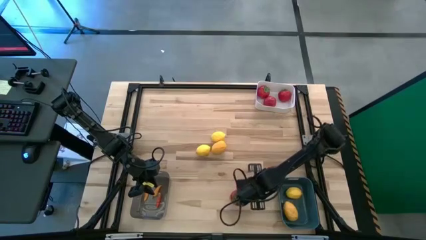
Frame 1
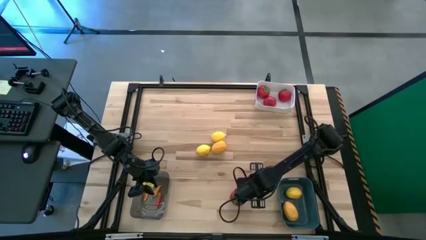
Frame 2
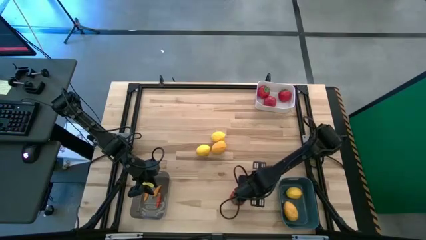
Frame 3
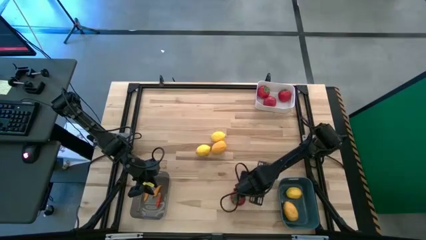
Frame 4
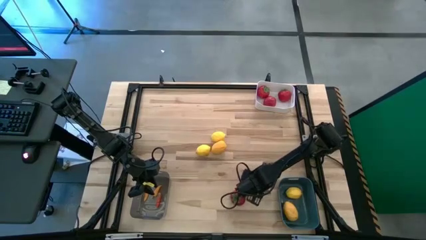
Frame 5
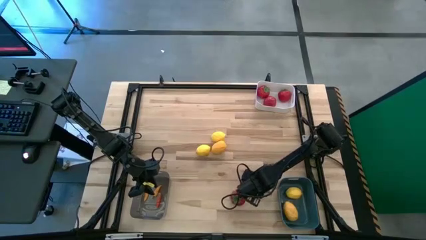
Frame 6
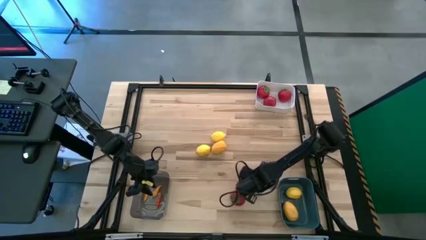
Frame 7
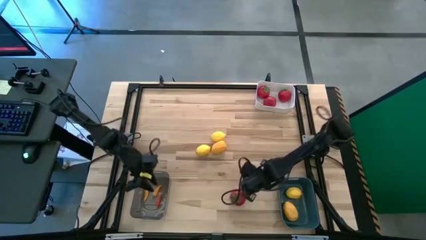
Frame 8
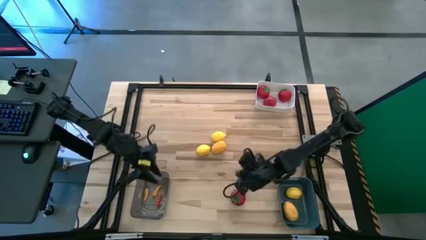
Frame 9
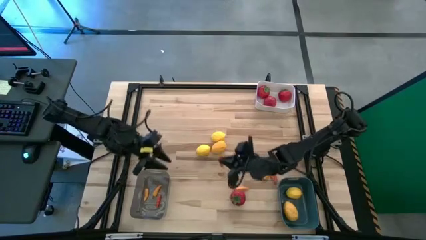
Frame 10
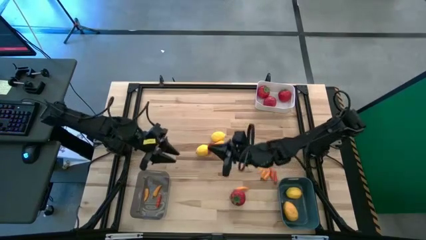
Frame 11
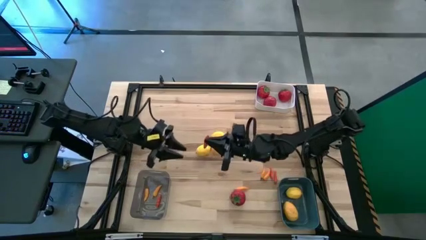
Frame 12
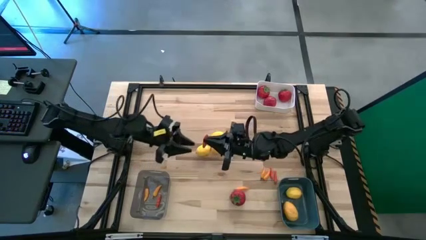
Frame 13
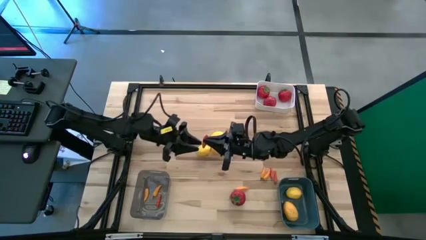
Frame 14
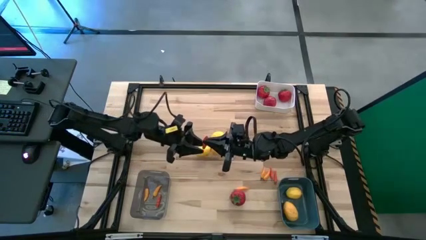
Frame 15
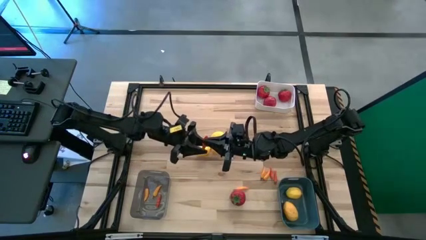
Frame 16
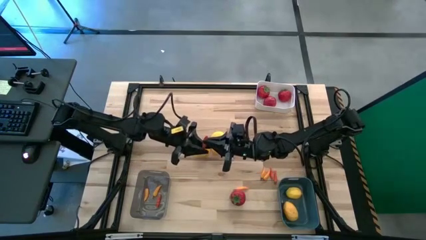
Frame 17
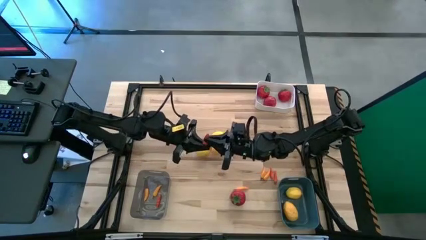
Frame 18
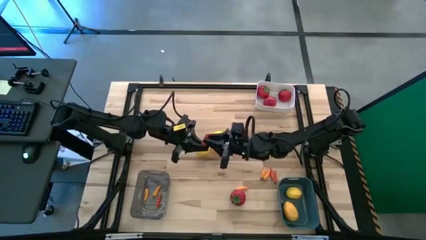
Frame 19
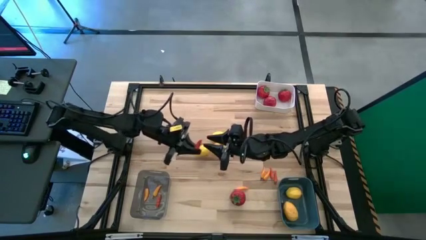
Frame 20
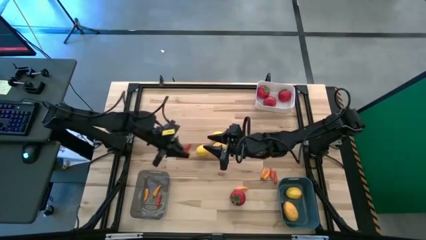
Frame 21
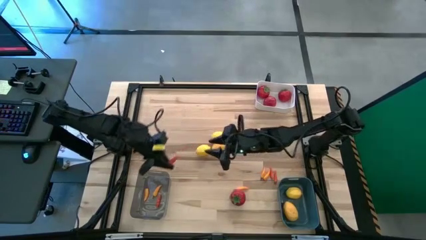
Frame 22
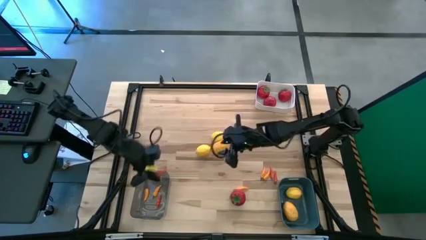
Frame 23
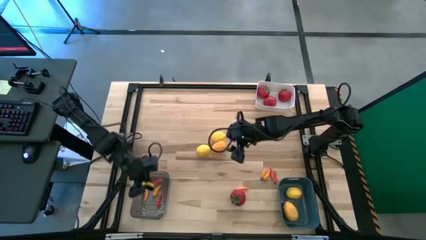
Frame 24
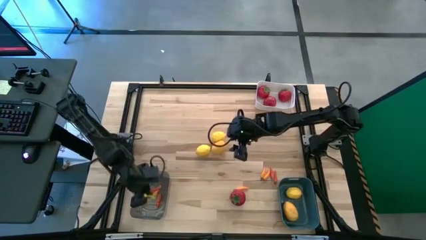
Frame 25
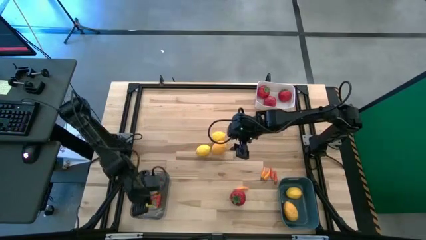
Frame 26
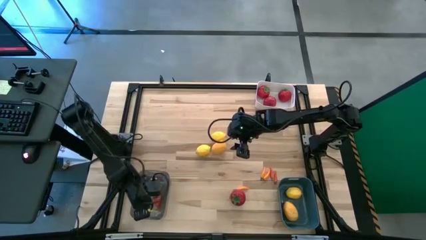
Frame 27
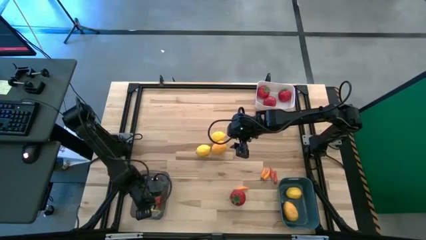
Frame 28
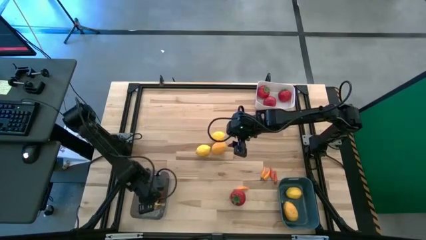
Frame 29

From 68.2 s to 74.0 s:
Task: Sort produce into baskets
Put the orange chili pepper into the black bin

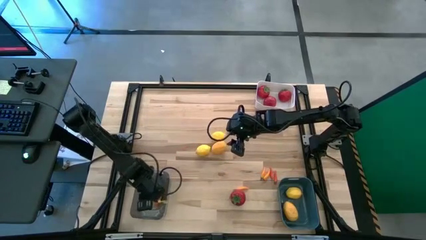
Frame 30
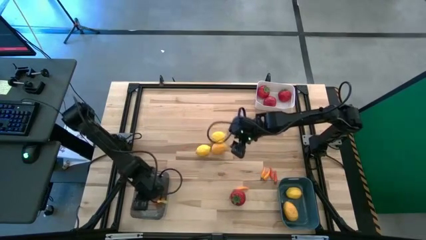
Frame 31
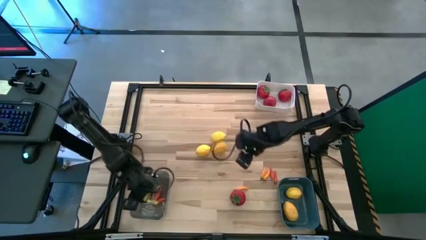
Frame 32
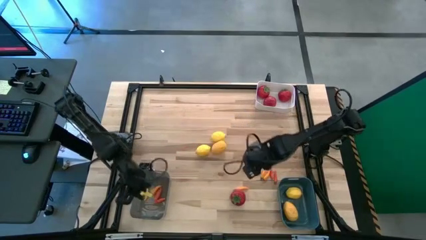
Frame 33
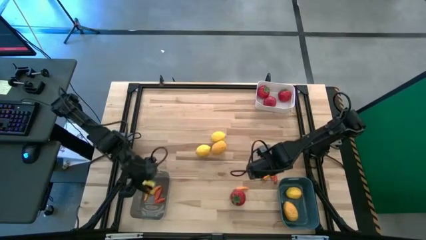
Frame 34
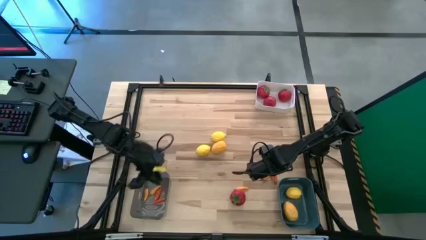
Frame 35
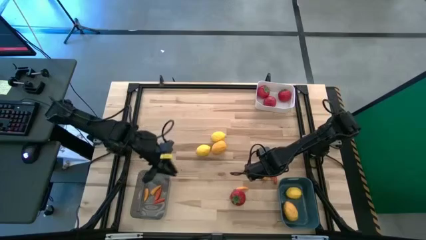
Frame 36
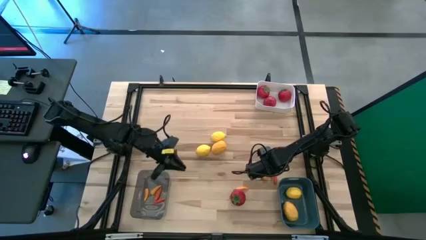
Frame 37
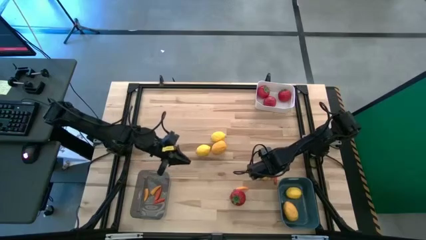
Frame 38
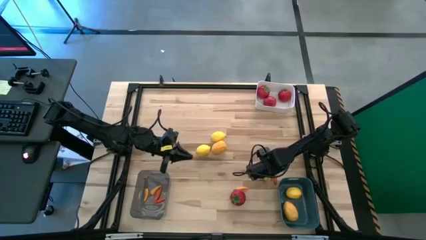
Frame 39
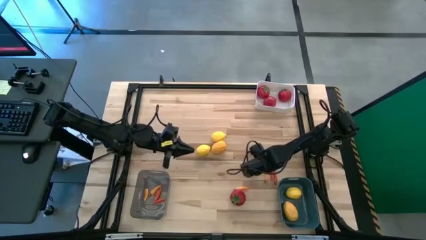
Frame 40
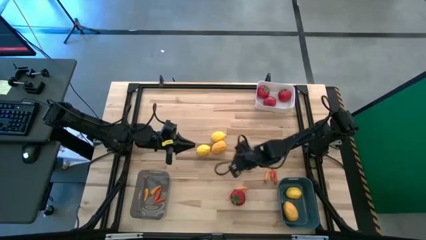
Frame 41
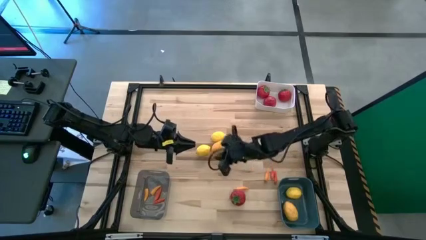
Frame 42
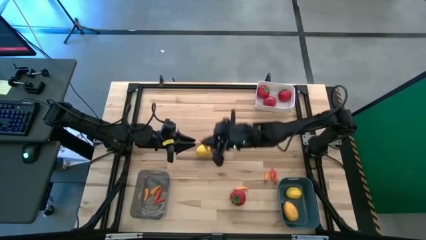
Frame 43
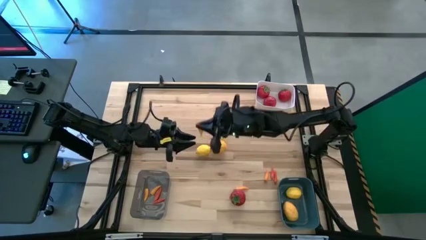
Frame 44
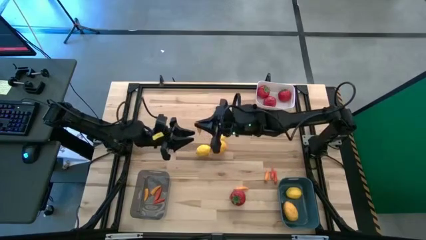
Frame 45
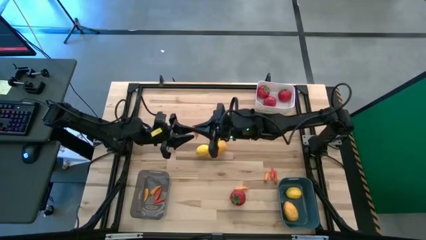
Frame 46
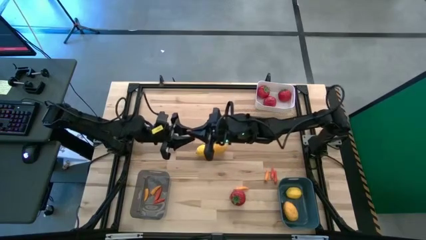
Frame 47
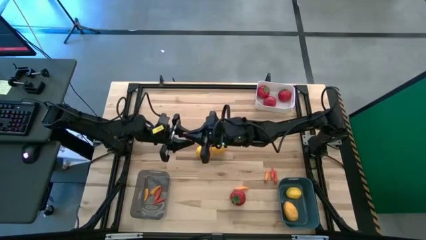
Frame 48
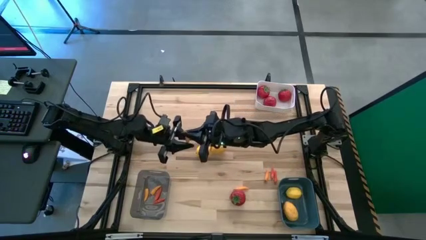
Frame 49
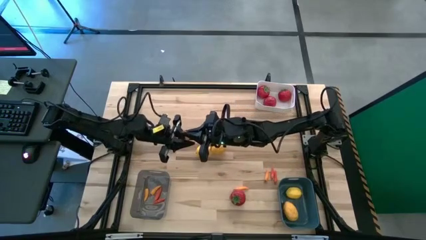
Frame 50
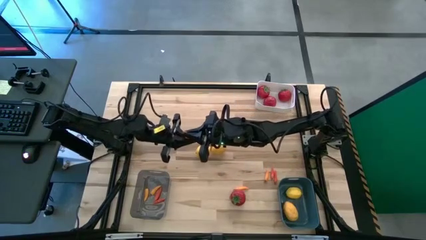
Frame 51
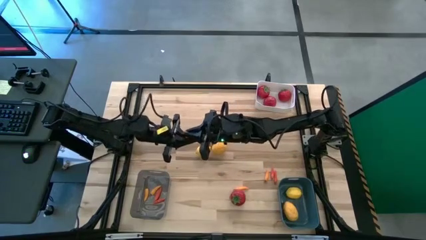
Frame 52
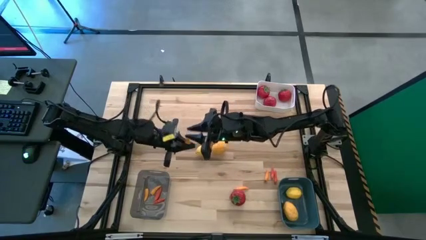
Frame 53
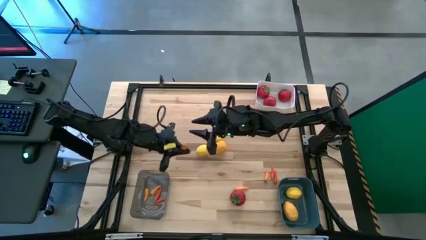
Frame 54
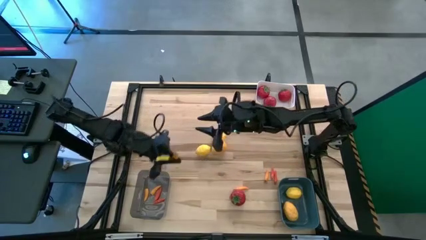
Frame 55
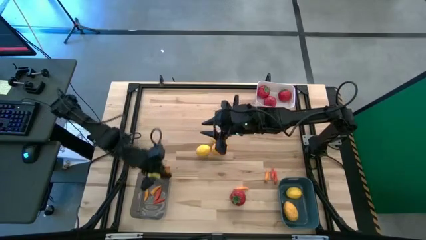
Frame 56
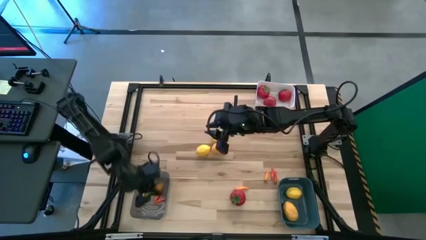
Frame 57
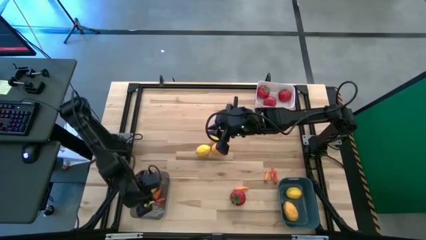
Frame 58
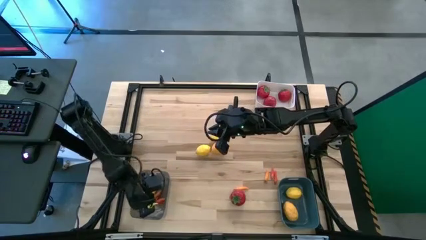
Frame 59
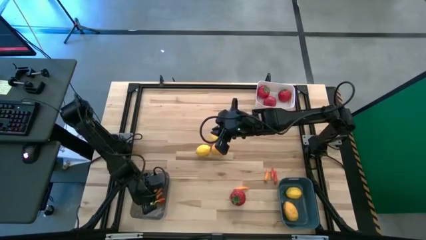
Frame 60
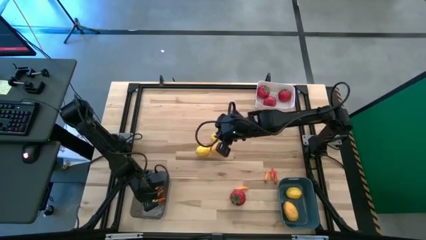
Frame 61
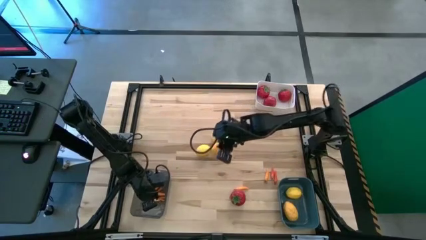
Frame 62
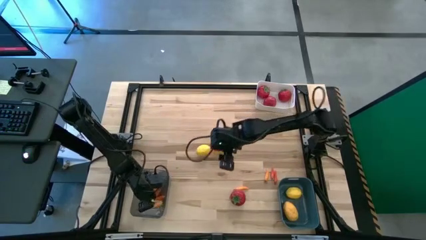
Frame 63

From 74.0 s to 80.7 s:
Put the yellow chili pepper into the black bin

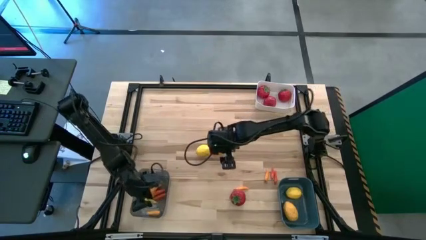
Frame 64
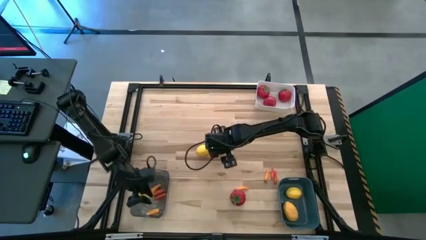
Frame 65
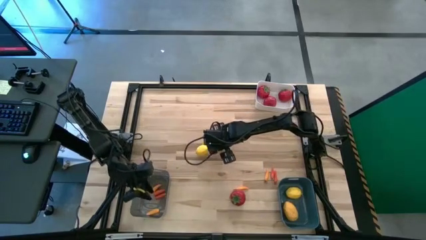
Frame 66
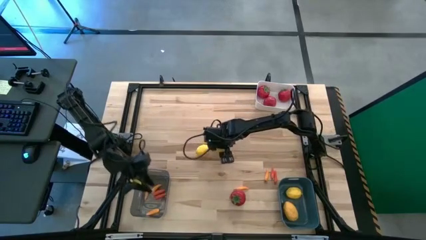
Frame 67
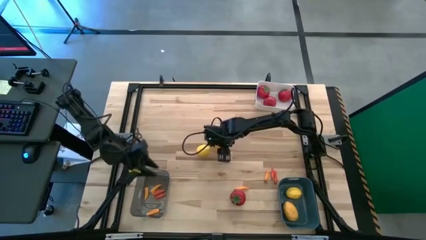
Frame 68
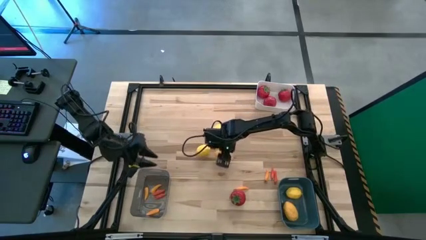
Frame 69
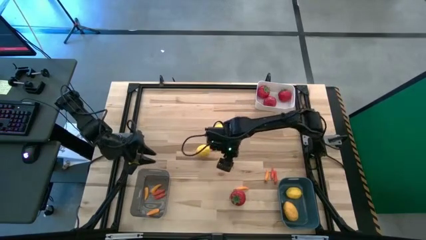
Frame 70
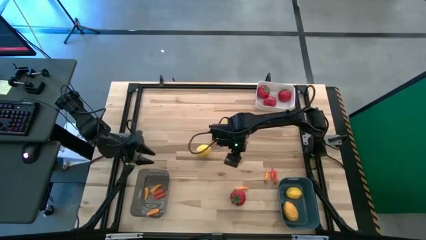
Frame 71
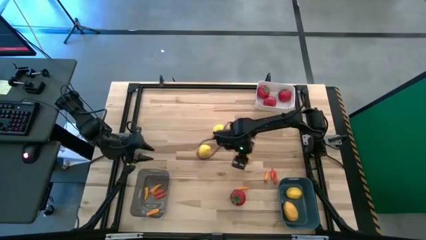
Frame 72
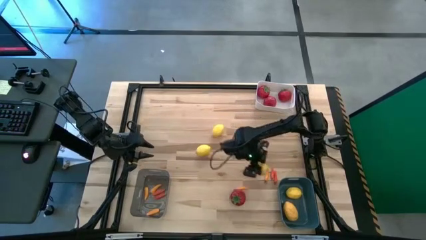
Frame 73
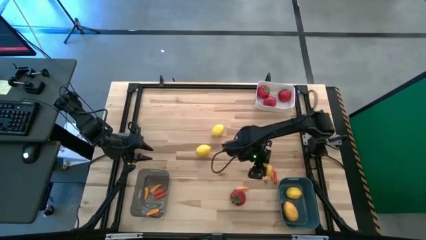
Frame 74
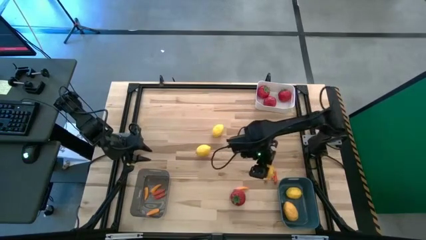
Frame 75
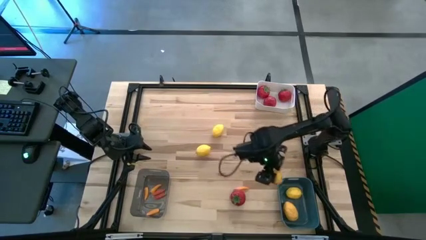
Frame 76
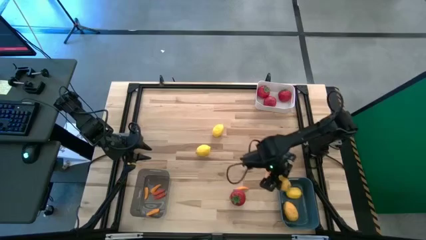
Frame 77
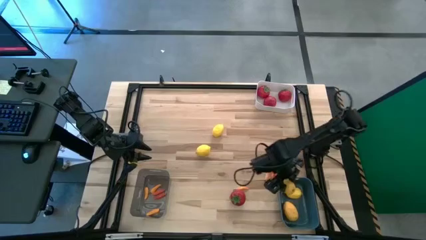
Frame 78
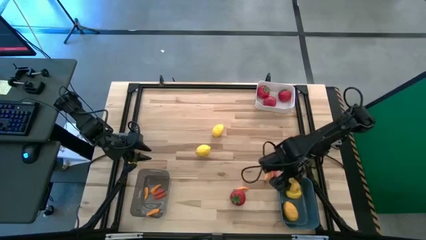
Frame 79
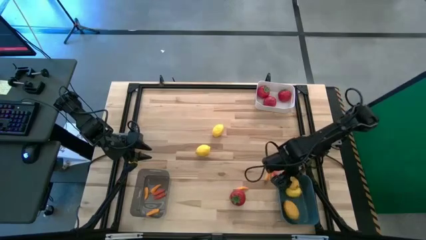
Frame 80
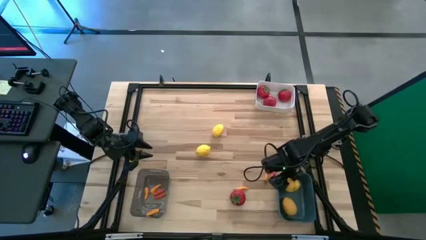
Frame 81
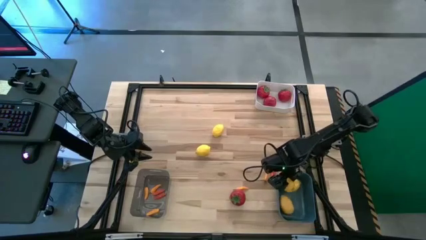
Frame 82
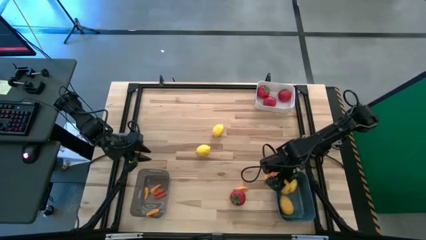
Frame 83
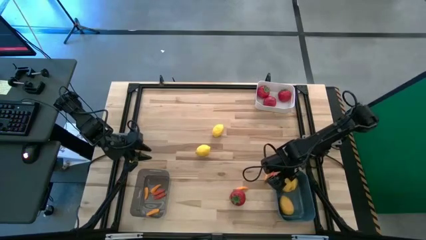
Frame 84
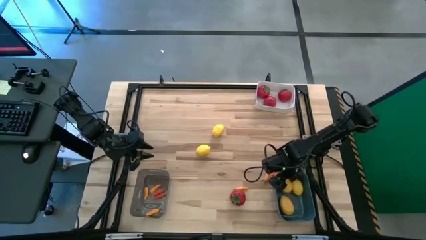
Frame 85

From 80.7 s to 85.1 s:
Put the lemon into the blue bin
